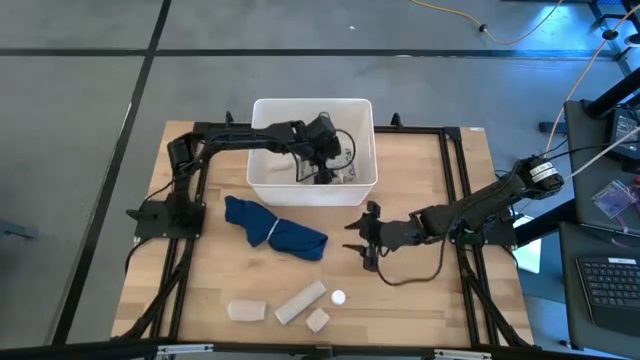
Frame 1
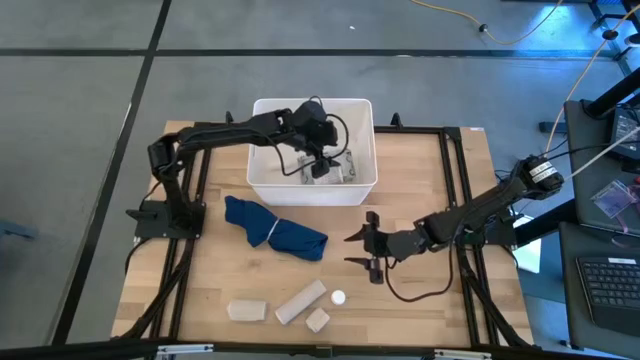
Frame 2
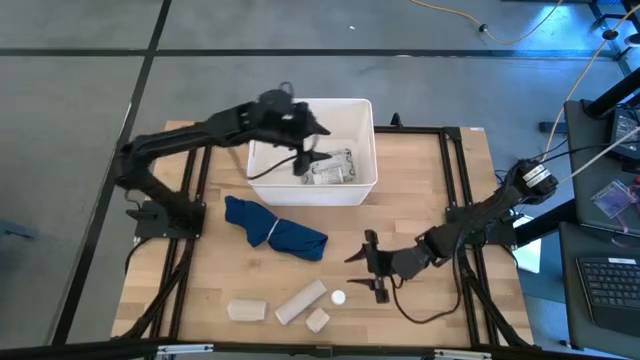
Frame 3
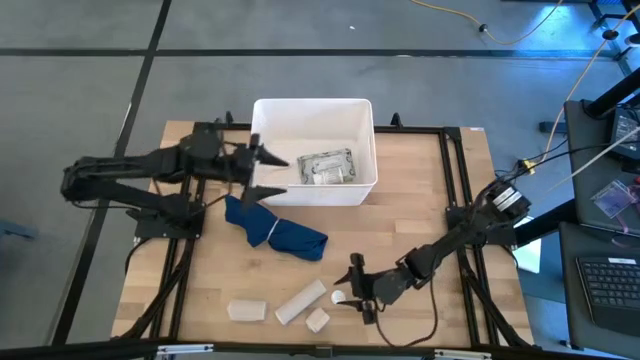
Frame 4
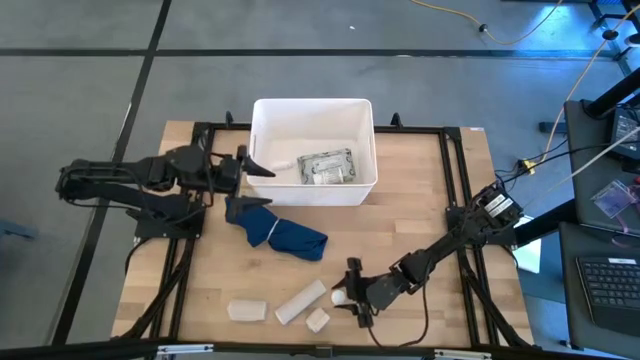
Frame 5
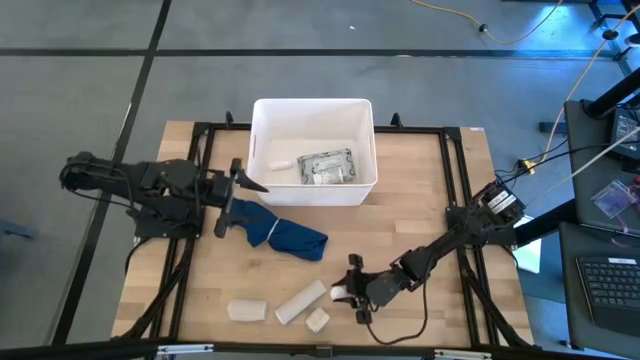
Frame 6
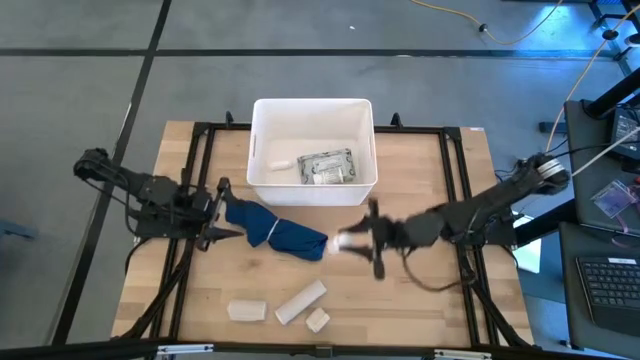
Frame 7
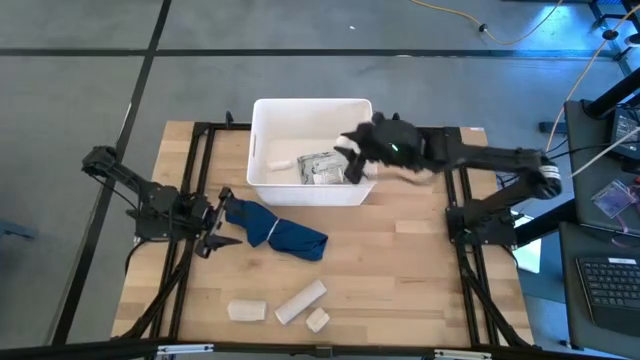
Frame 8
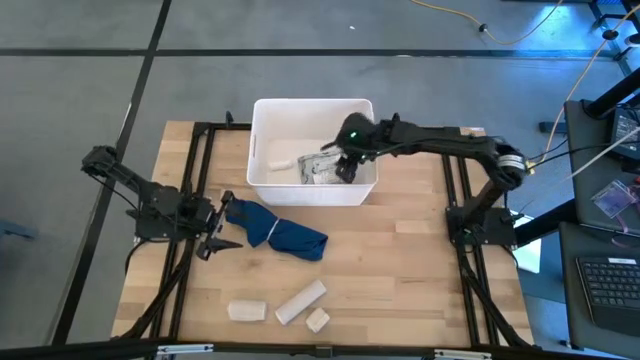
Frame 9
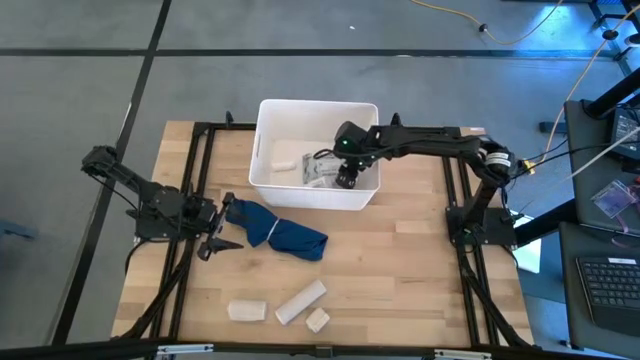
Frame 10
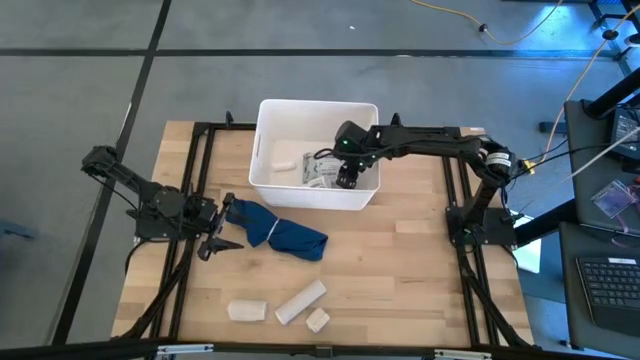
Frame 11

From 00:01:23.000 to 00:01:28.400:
Task: Pick & place medical supplies in basket/bin
Put the white medicine bottle into the white bin

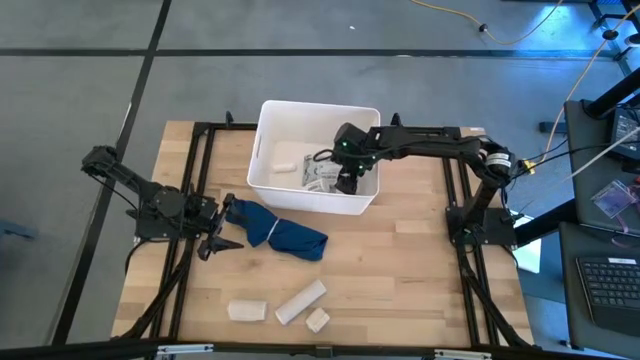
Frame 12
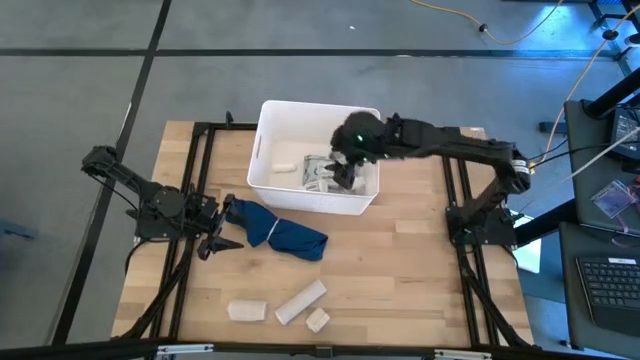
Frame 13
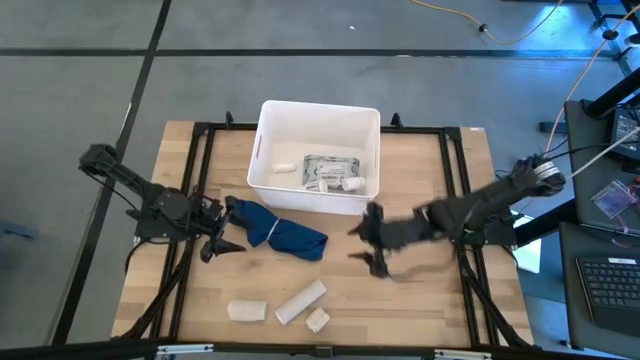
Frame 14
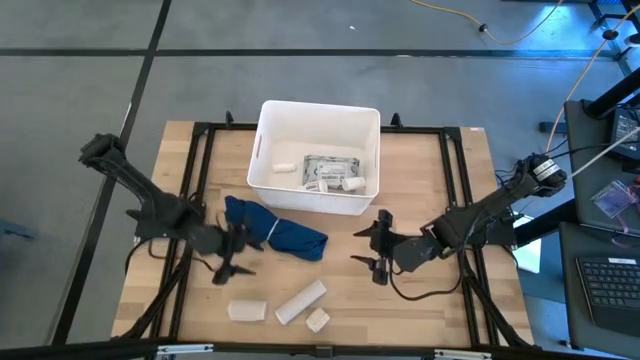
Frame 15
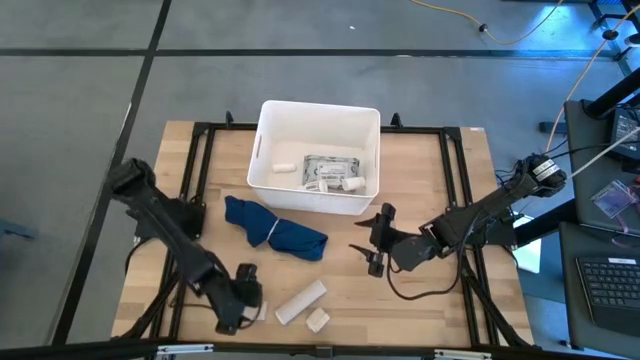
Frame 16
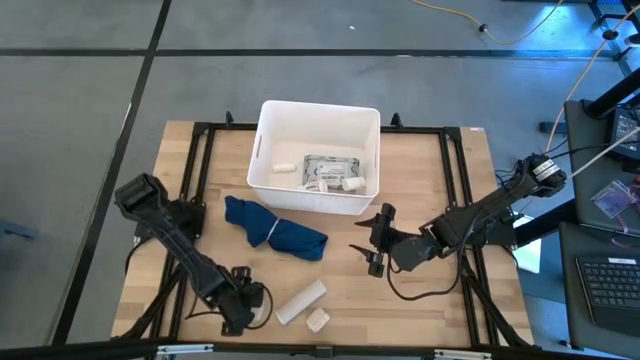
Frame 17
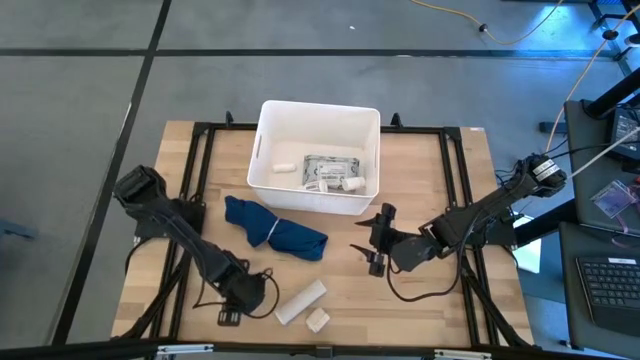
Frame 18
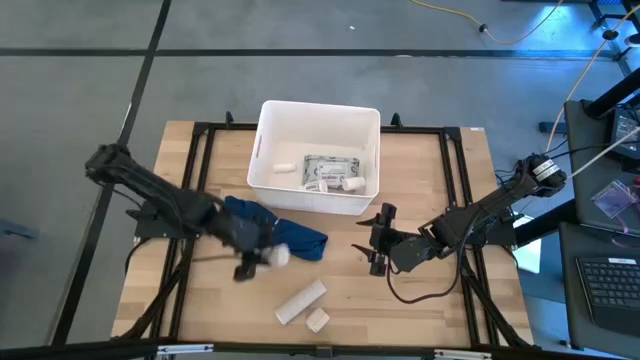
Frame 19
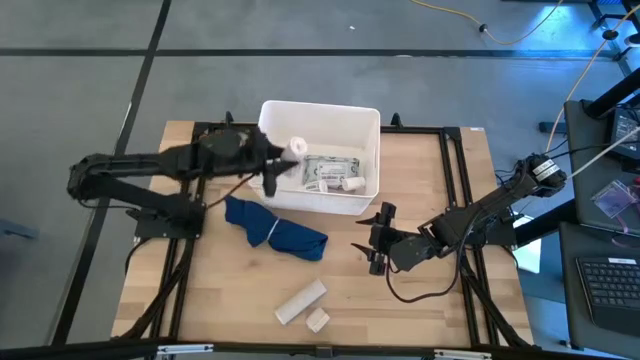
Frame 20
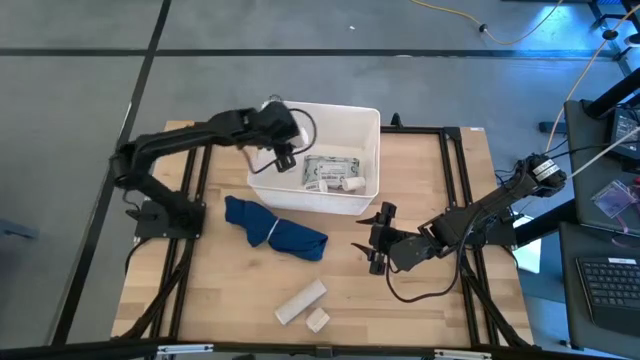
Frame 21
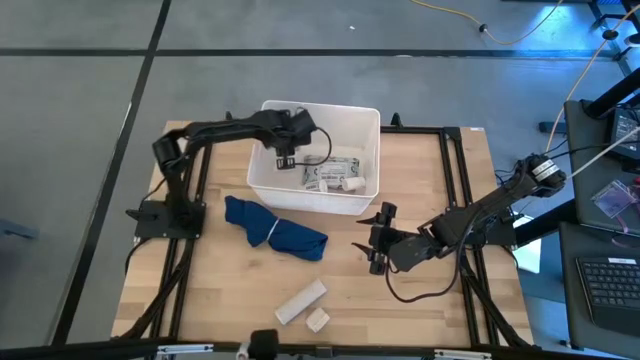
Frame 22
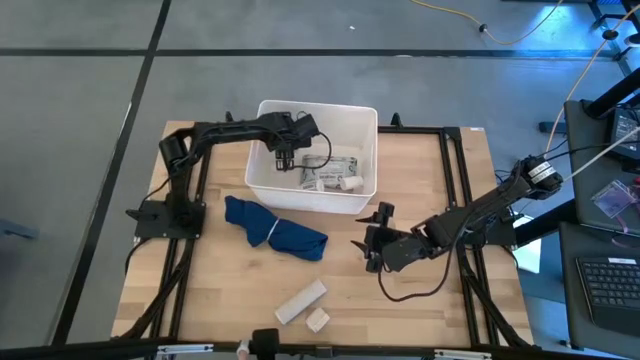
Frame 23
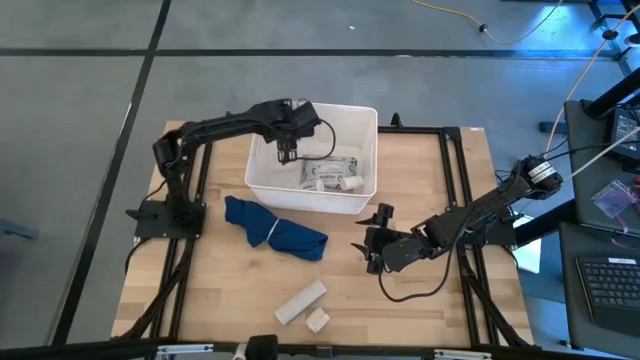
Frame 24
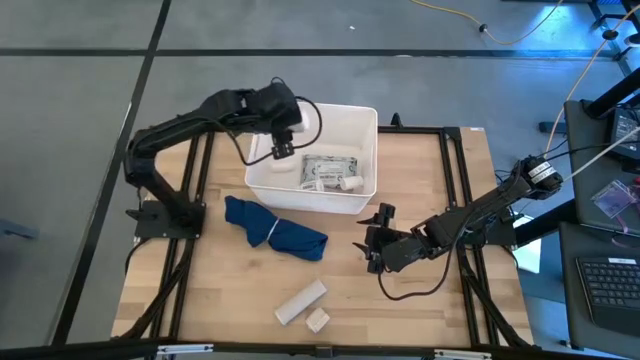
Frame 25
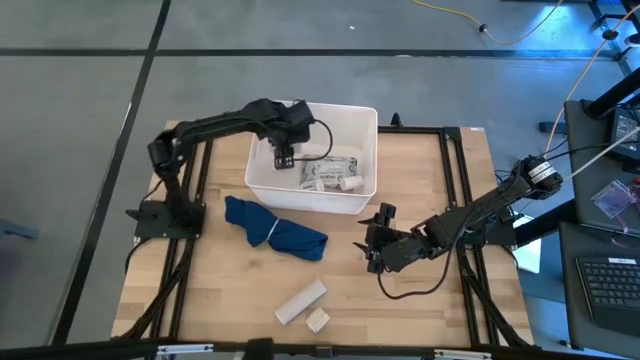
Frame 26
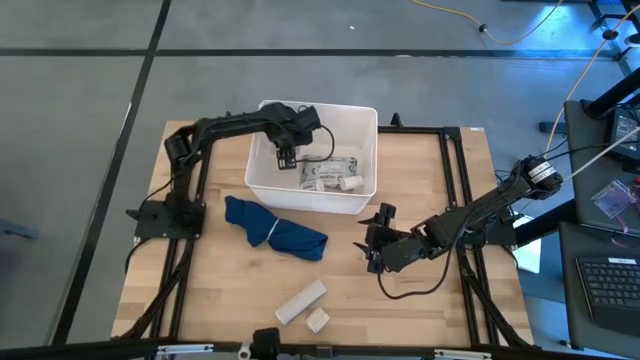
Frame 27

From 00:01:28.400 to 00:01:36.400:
Put the left light brown bandage into the white bin

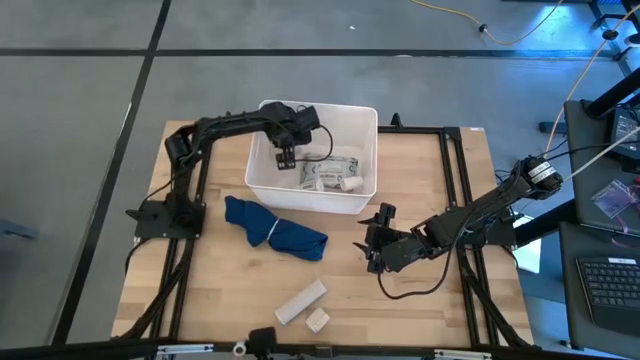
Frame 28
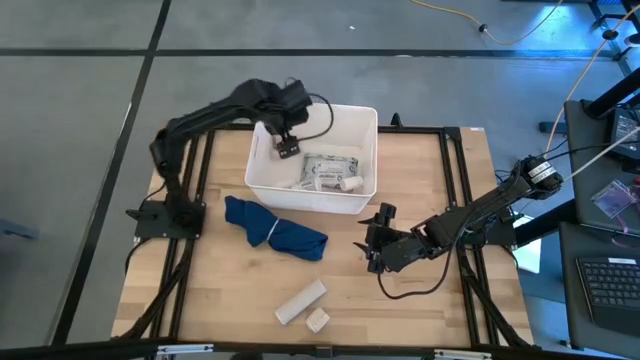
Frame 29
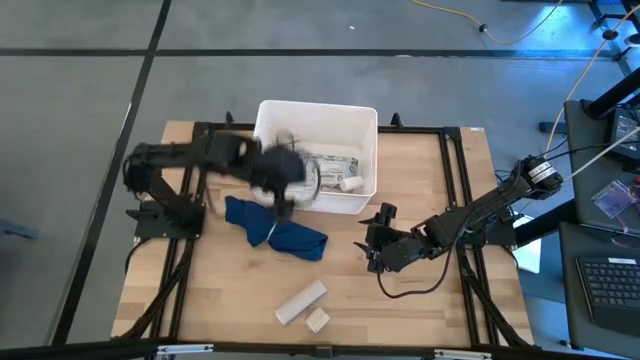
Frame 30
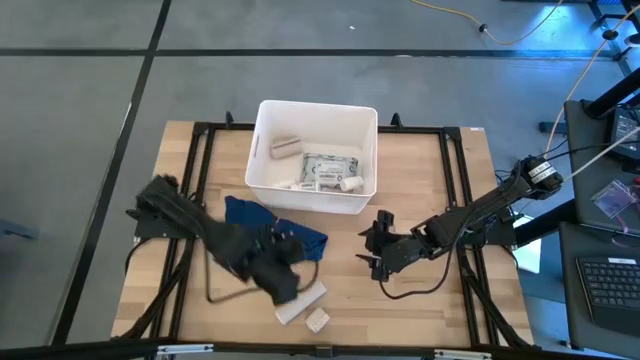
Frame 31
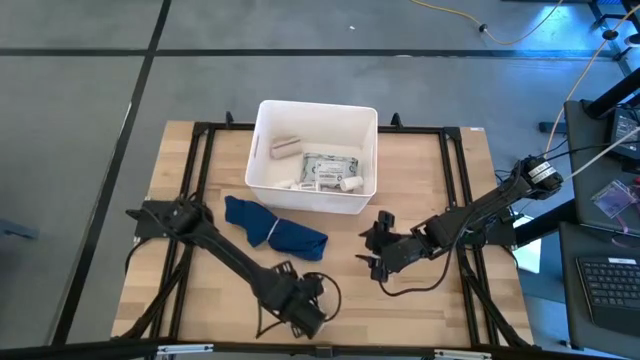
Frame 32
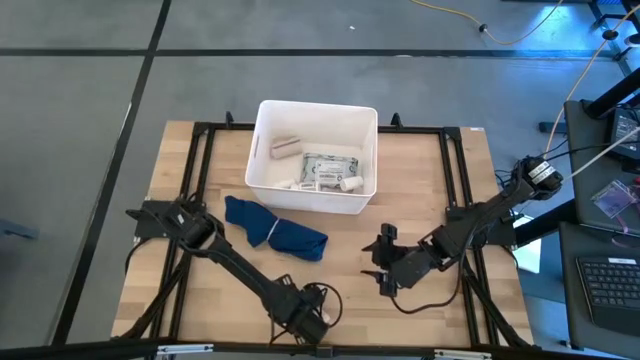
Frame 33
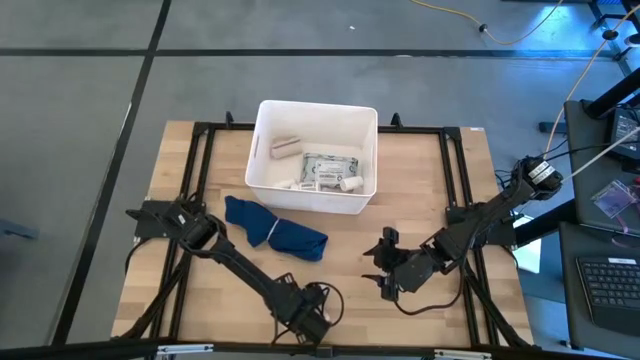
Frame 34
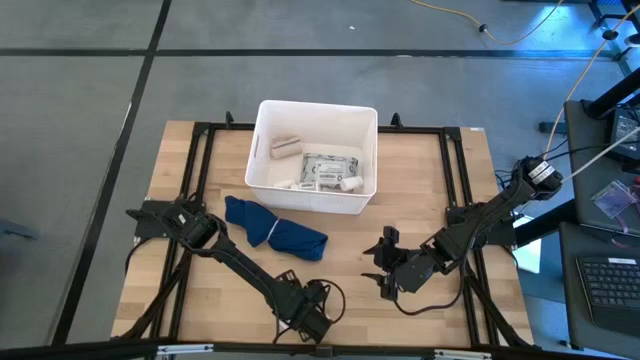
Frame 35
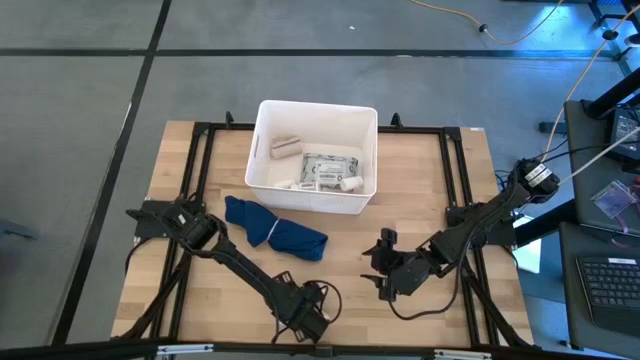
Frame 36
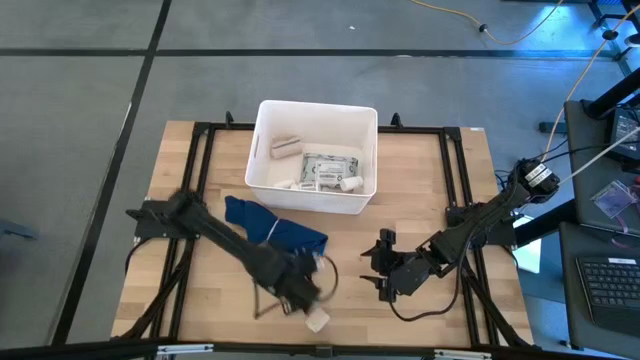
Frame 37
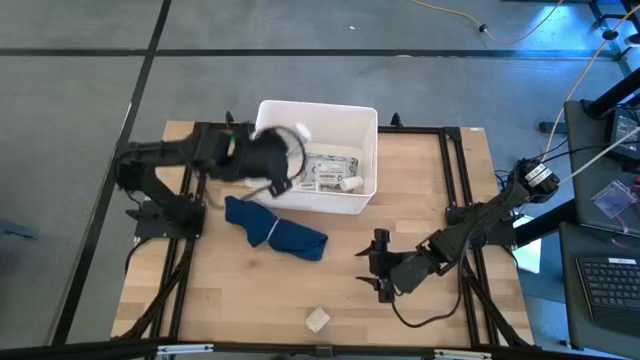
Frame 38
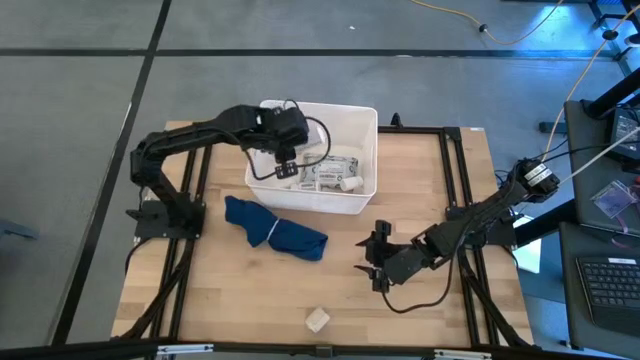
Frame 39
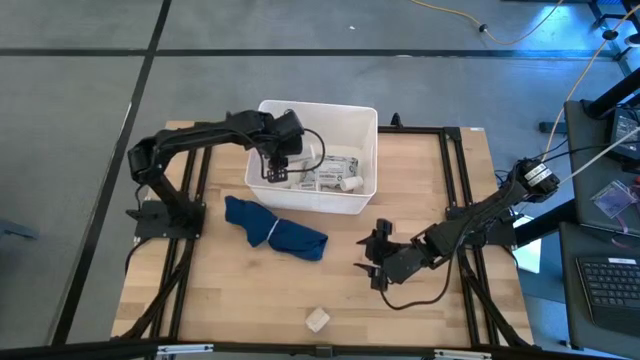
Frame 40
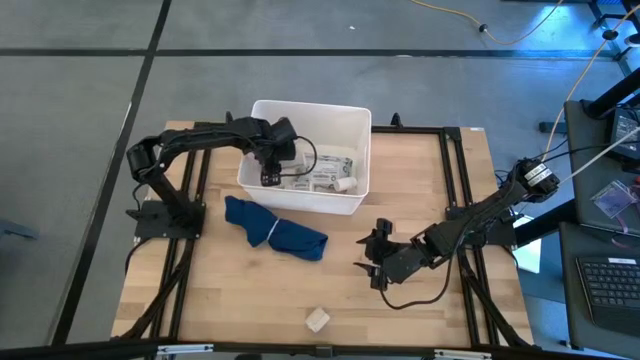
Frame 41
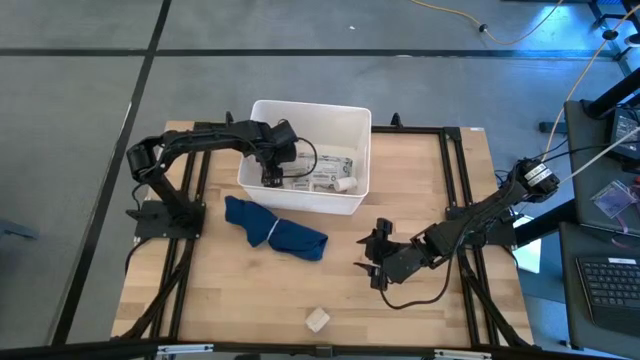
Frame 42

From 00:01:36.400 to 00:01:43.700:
Put the left light brown bandage into the white bin

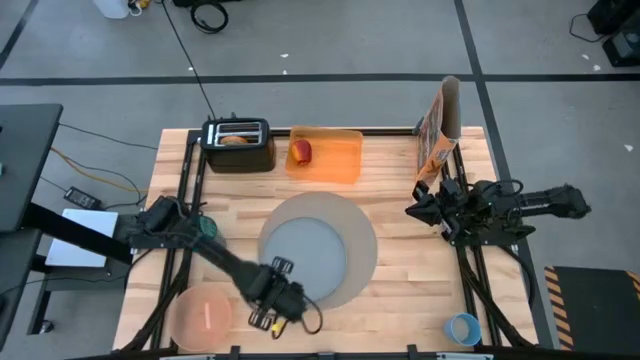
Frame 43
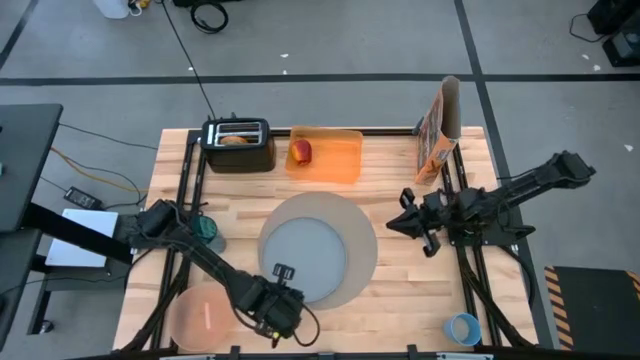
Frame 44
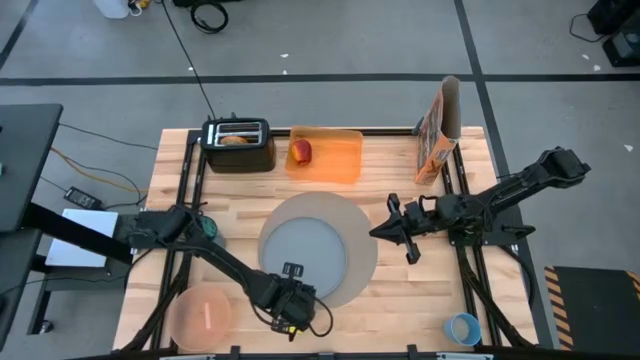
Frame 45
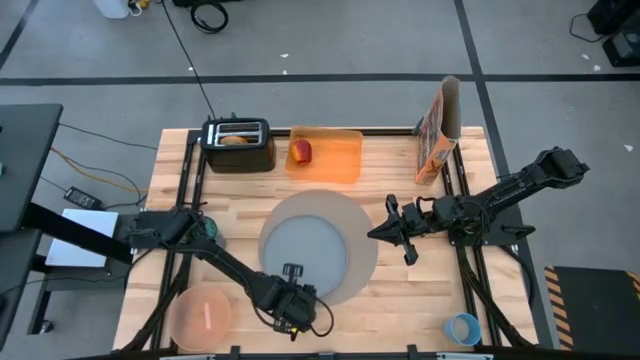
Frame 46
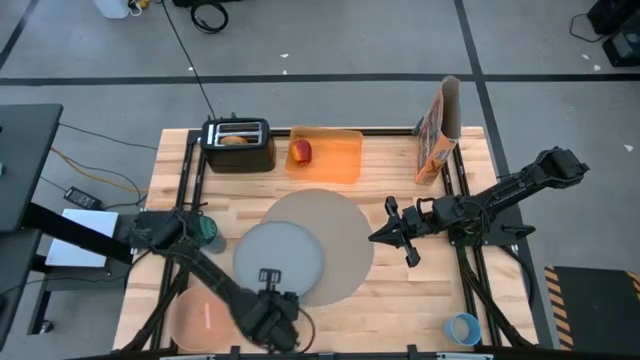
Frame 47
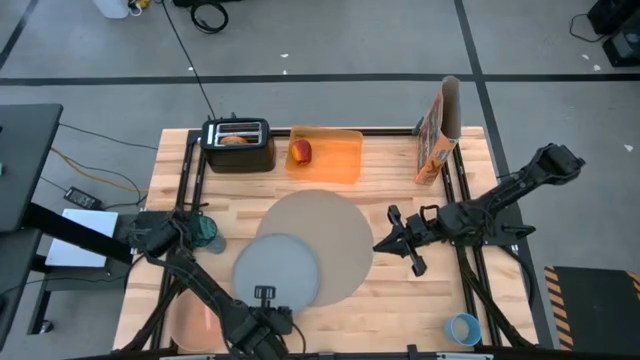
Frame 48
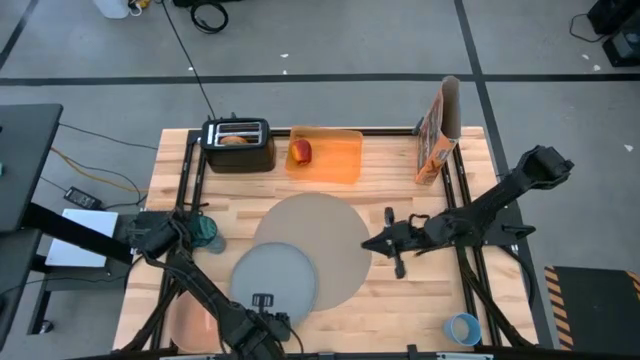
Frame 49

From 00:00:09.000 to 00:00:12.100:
Task: Arrange a breakfast setting
Put the blue plate on the brown tablemat
